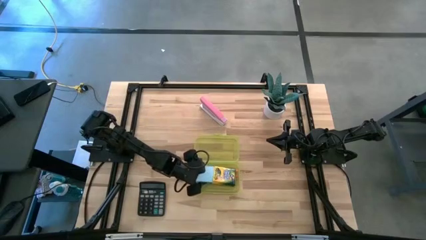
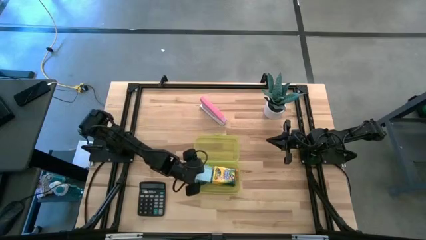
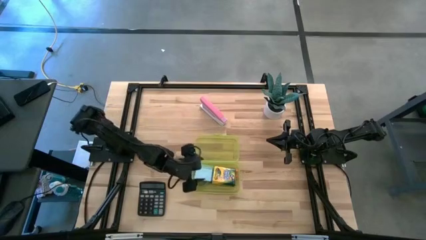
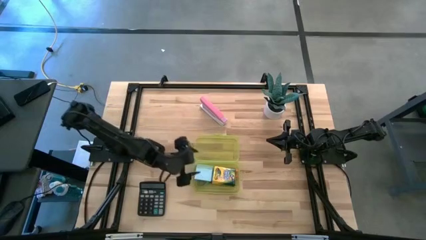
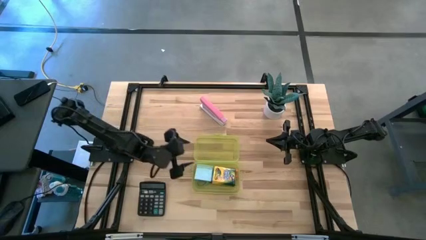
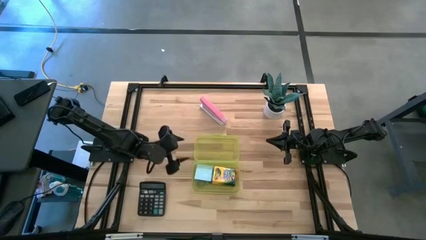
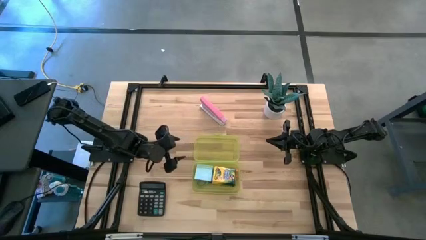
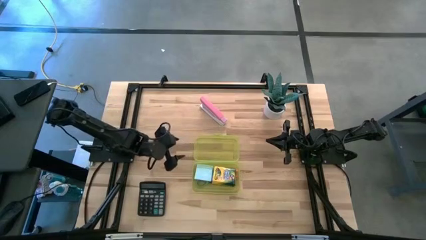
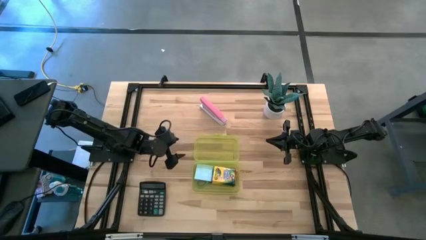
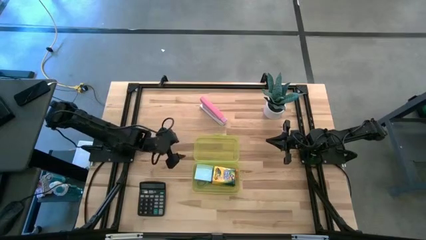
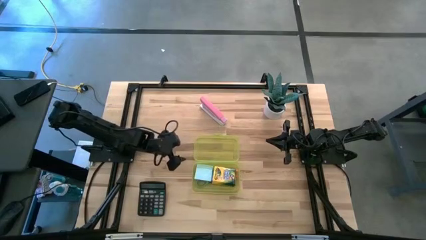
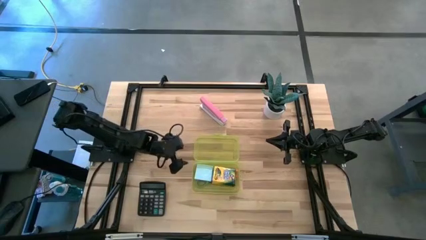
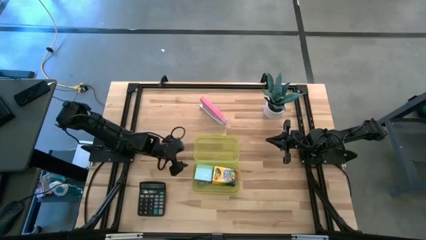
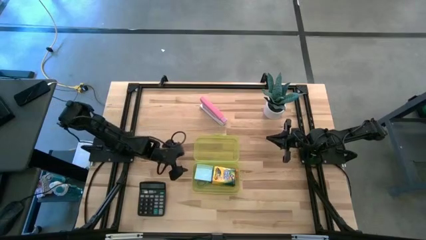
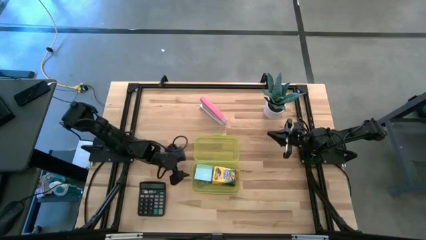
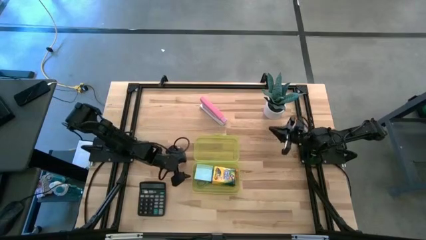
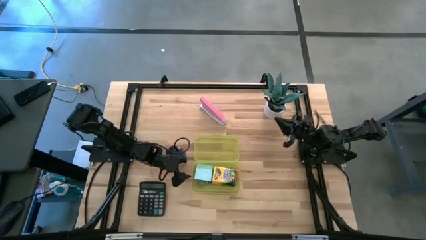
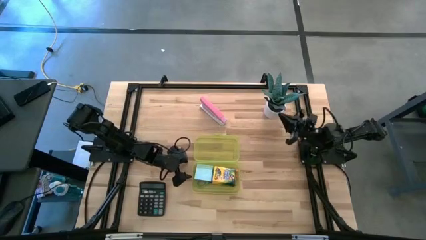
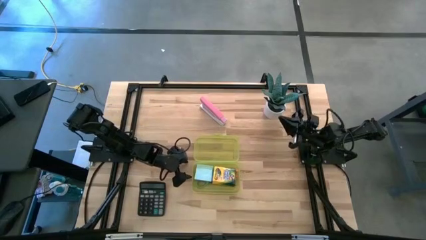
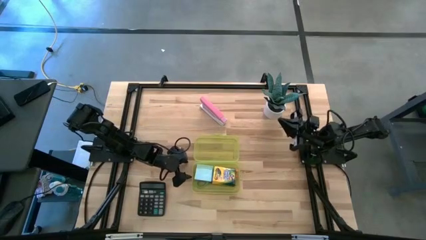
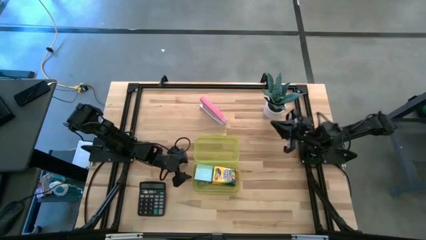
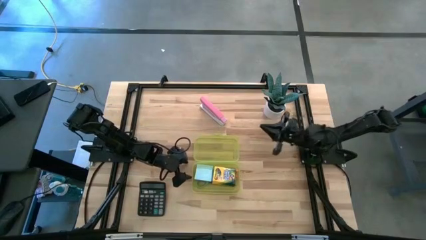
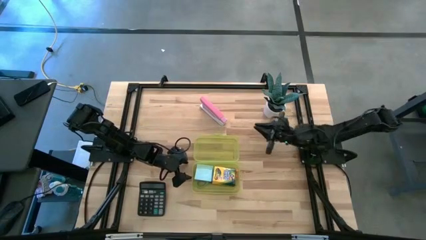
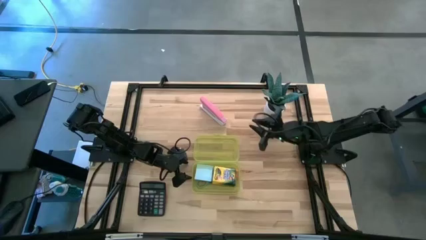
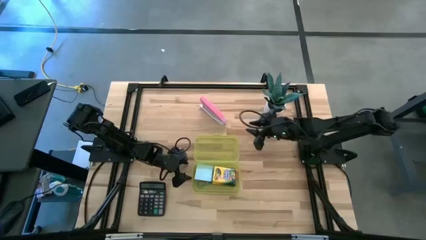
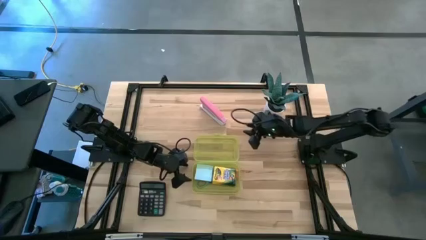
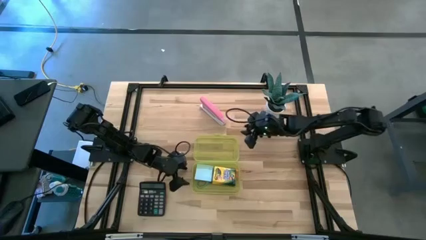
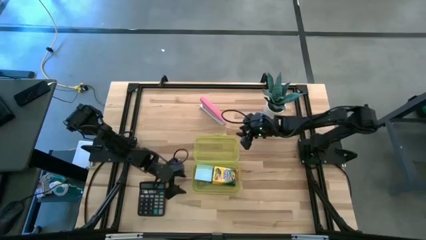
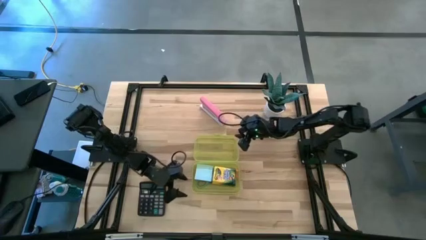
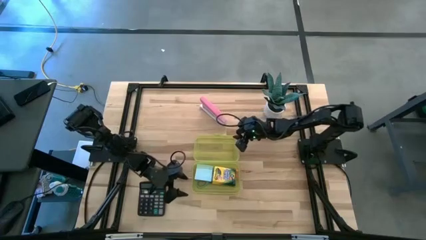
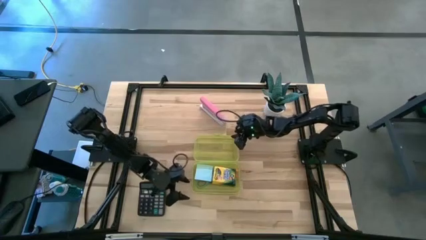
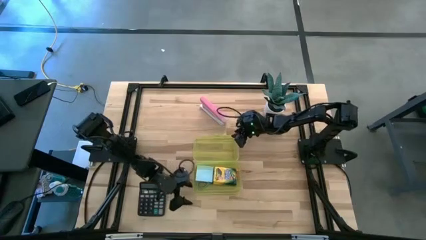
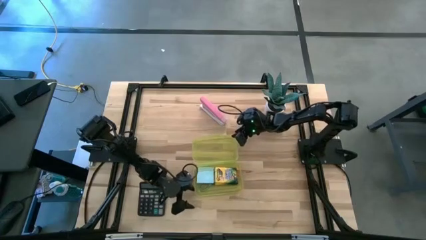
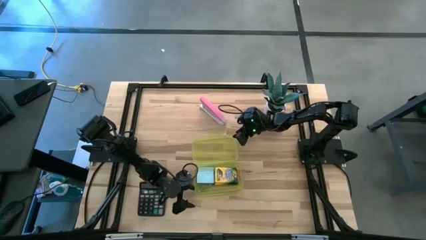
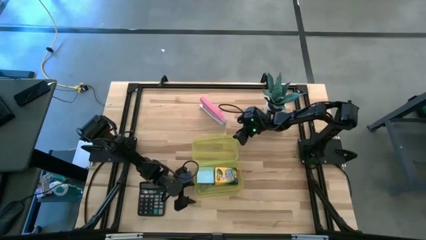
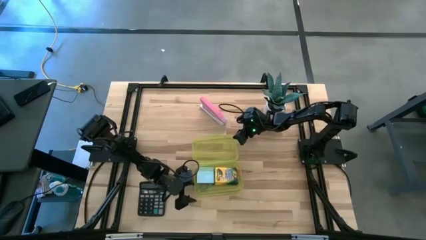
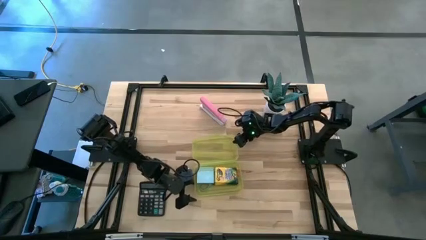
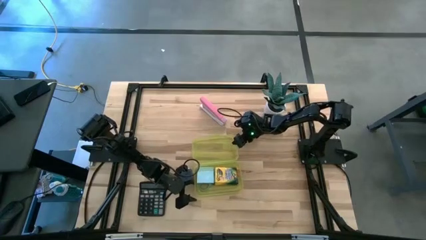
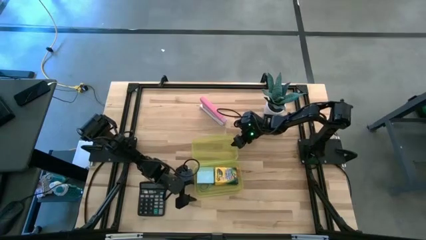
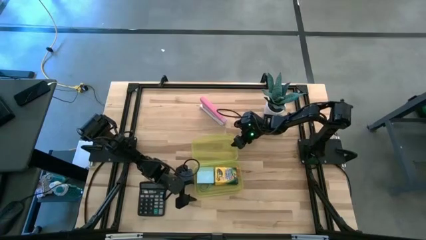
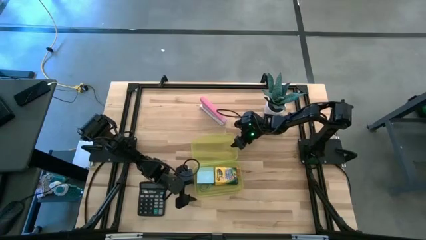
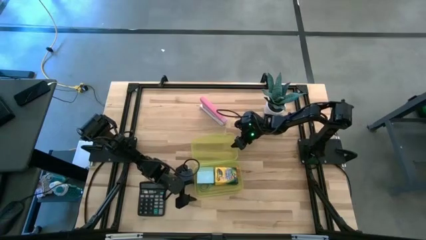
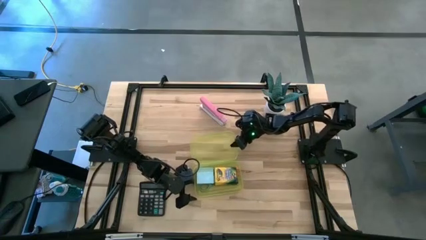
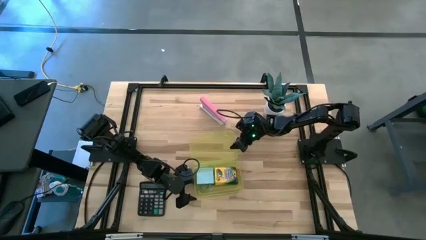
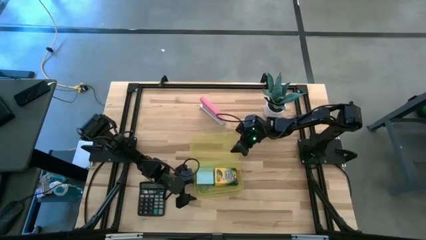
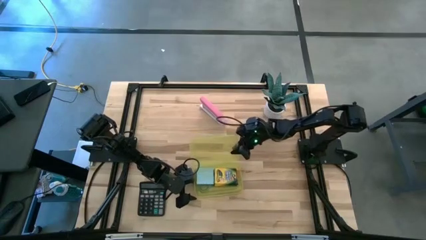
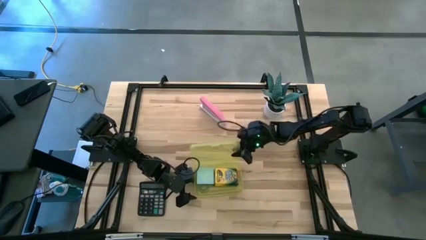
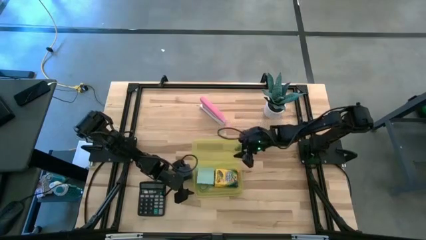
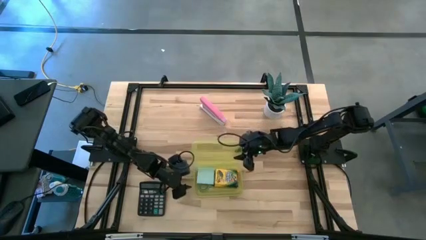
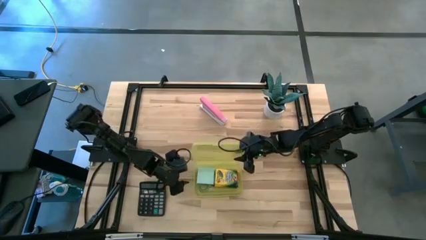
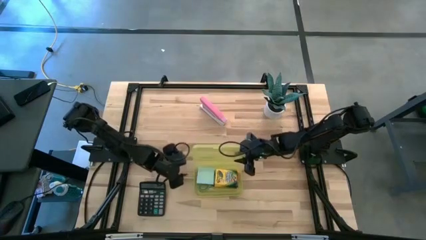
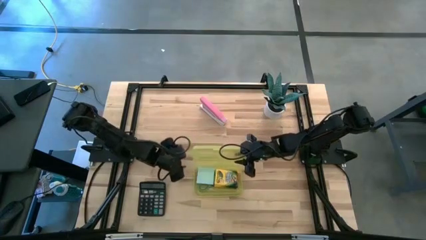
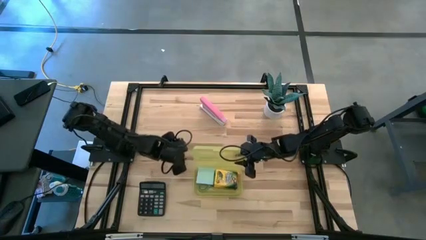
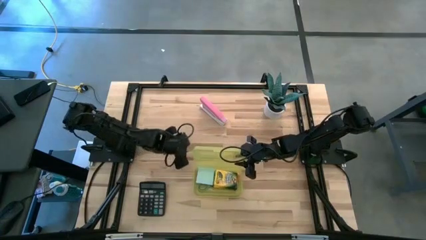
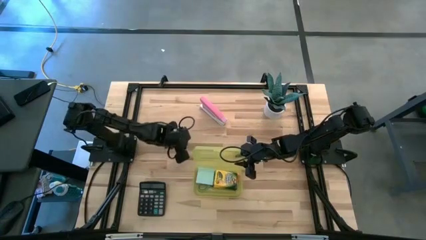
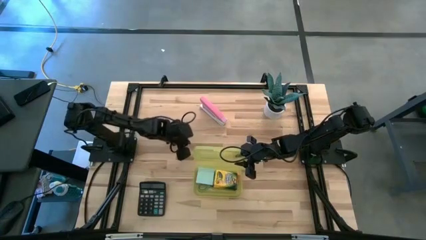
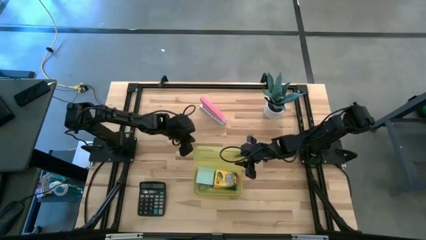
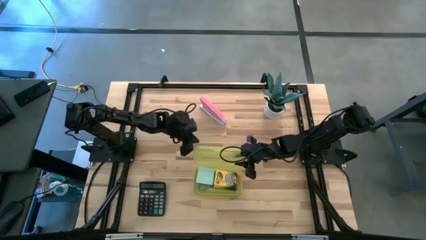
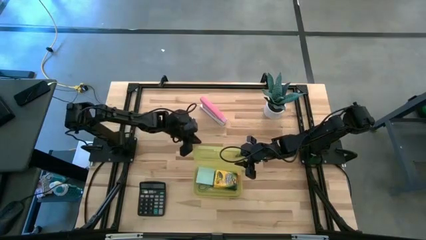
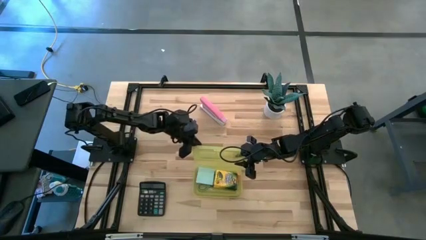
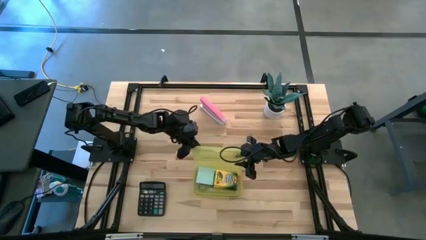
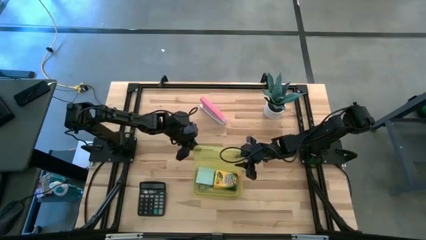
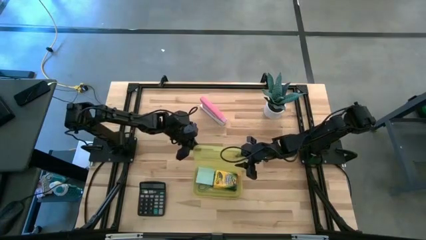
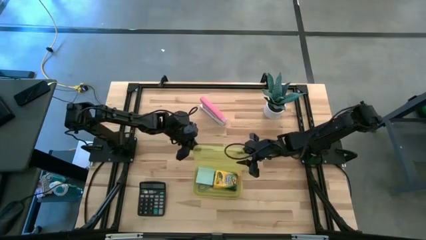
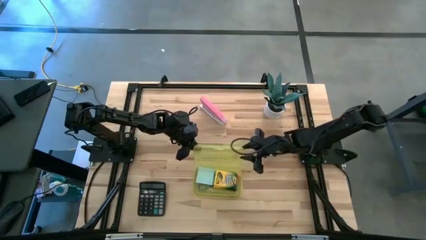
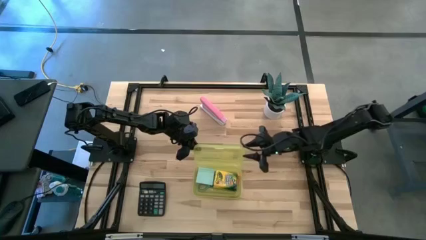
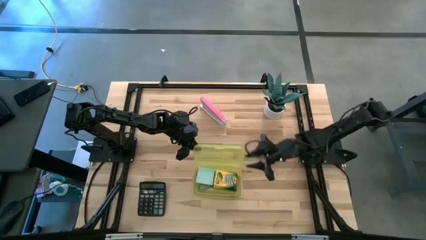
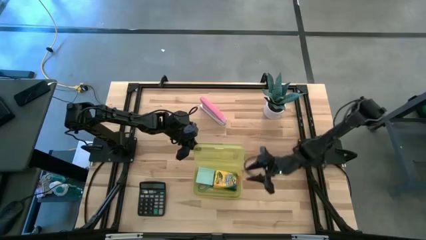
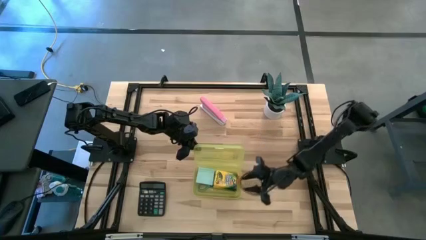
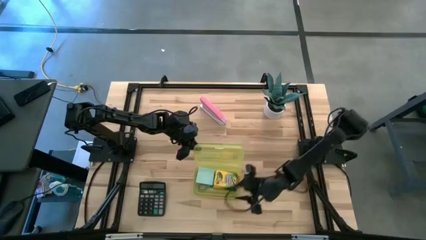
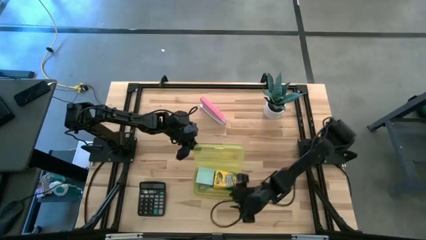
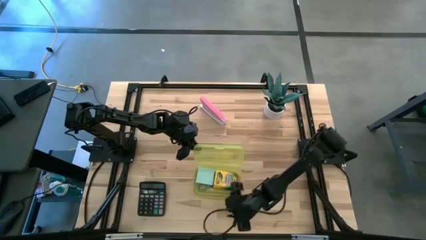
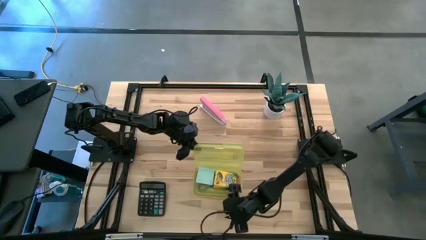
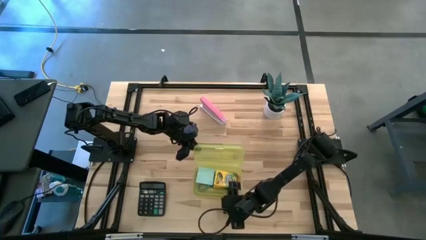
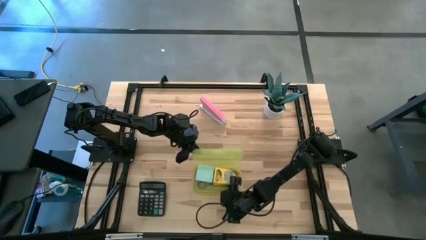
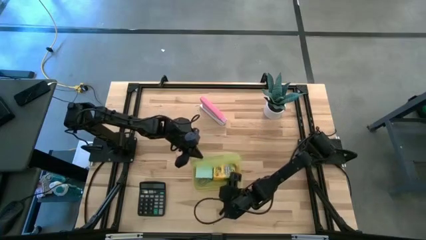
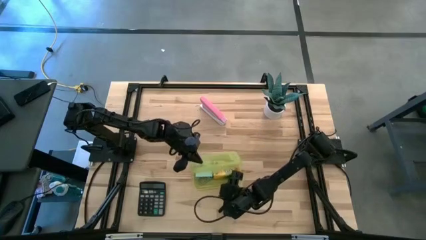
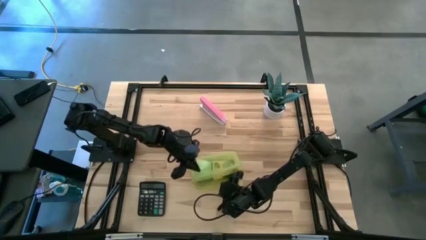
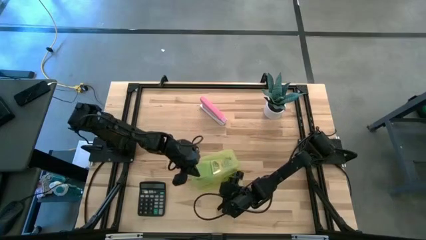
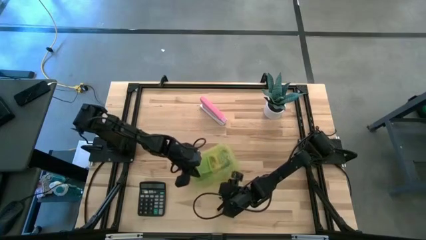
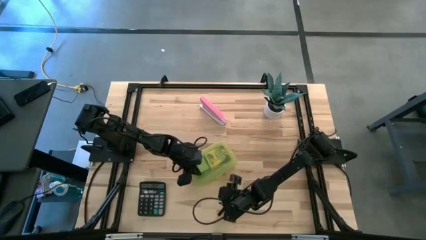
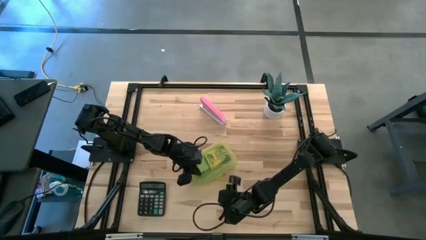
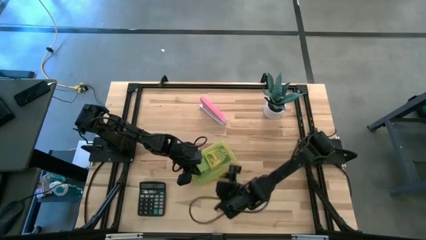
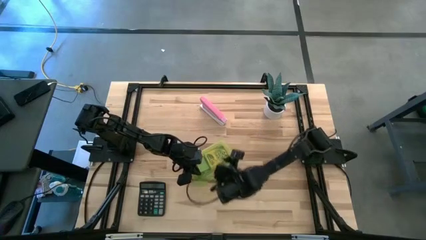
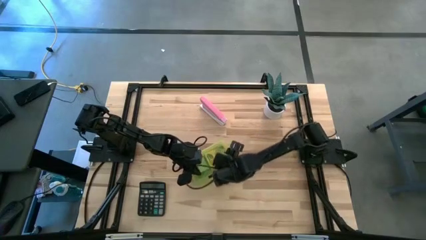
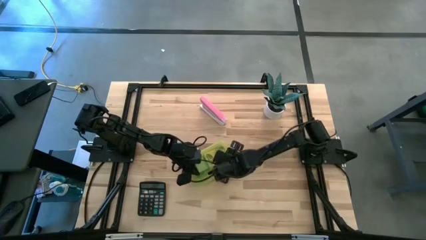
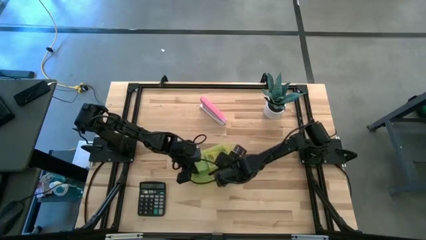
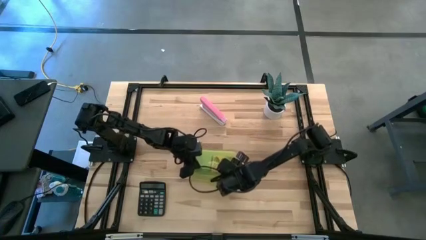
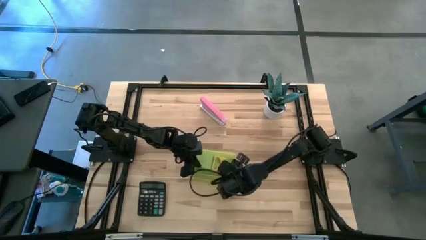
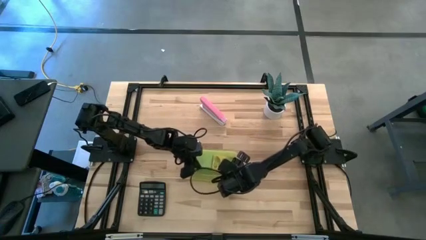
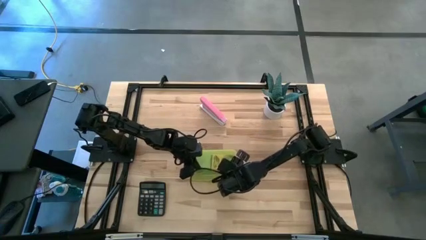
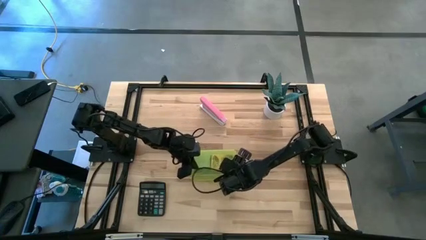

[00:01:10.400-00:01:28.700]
Task: Pack school essentials
Close the yellow supply box
